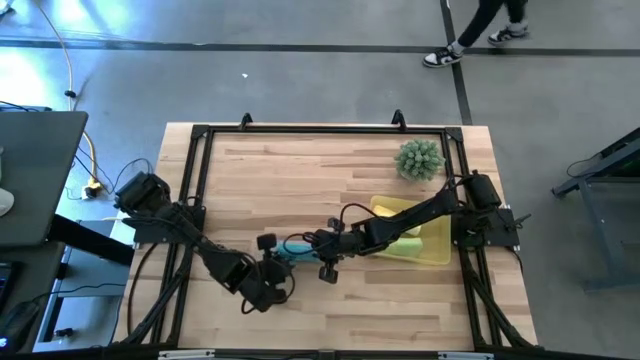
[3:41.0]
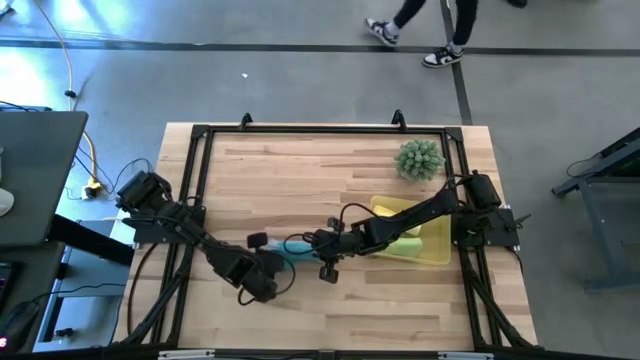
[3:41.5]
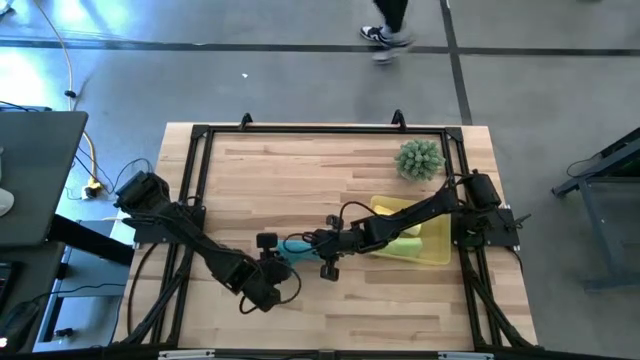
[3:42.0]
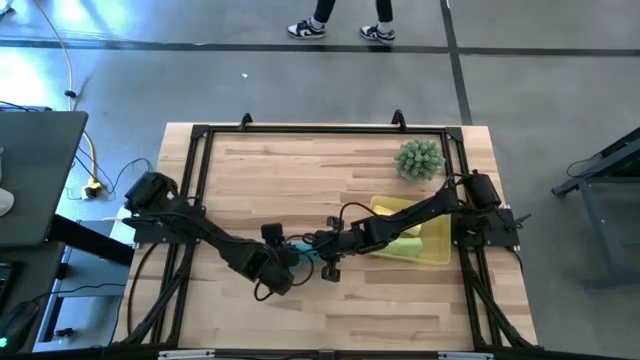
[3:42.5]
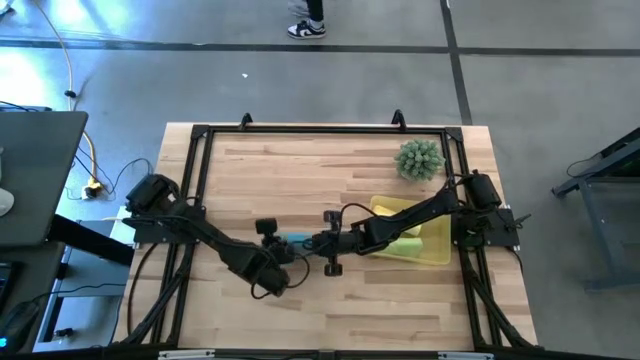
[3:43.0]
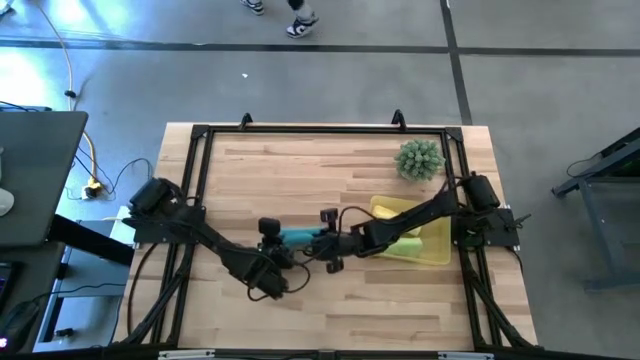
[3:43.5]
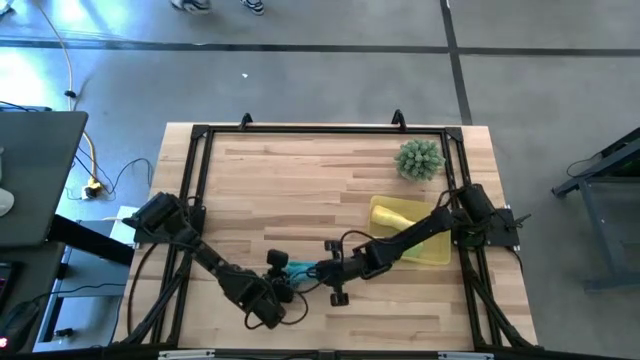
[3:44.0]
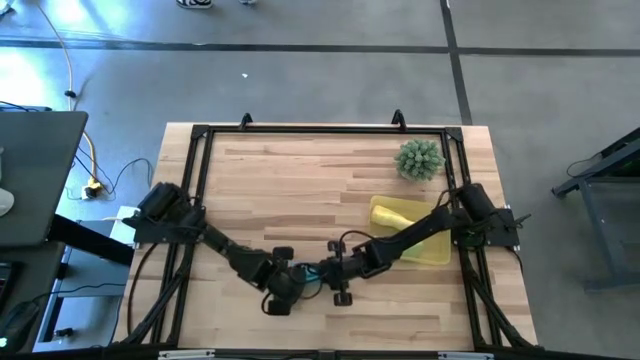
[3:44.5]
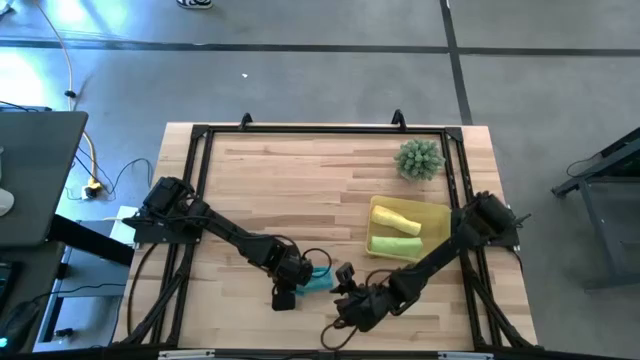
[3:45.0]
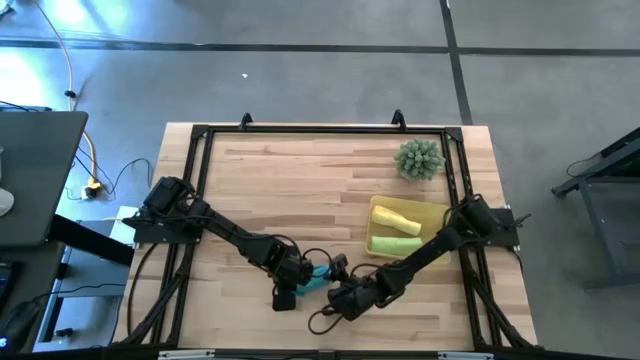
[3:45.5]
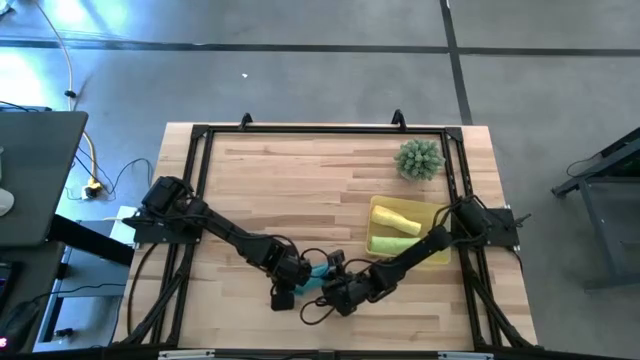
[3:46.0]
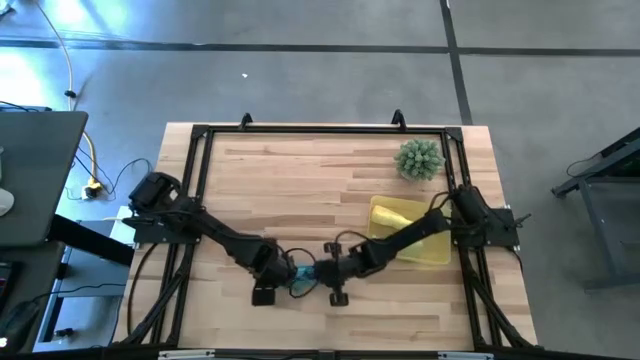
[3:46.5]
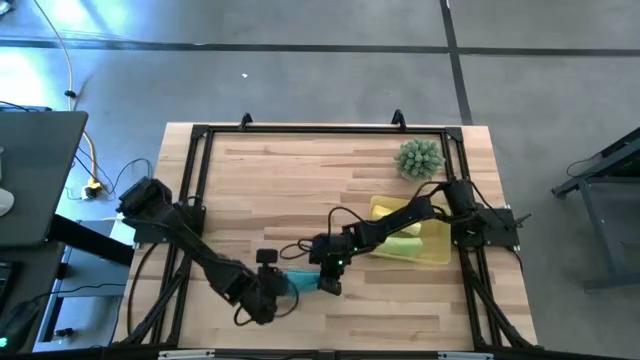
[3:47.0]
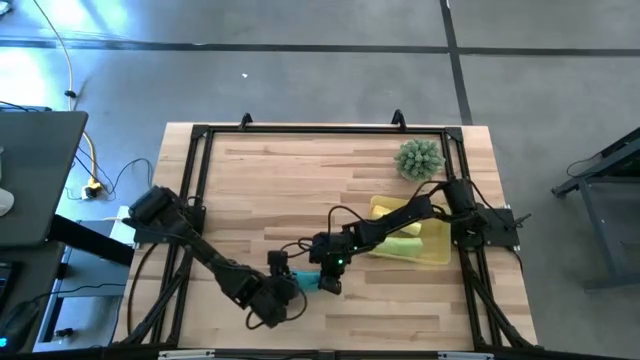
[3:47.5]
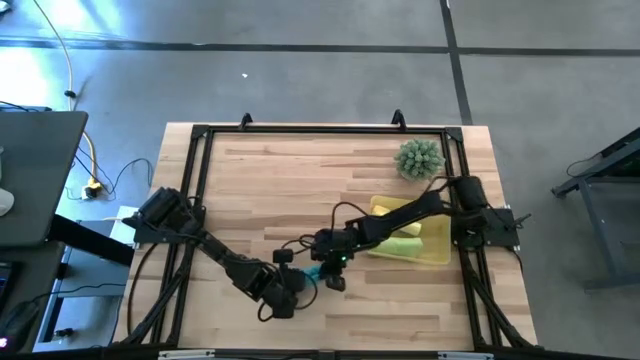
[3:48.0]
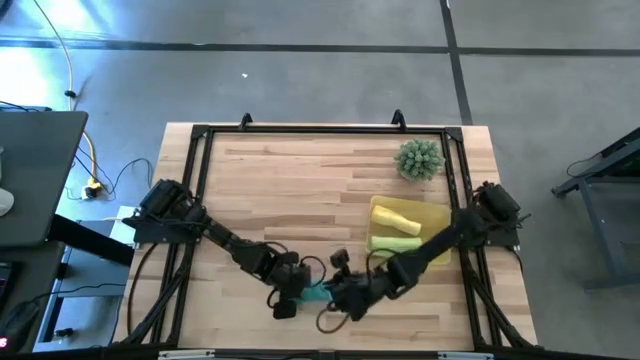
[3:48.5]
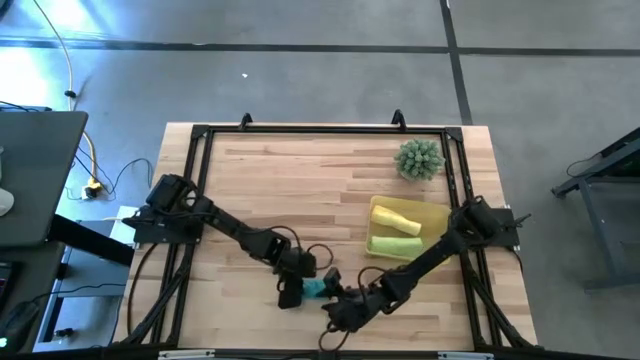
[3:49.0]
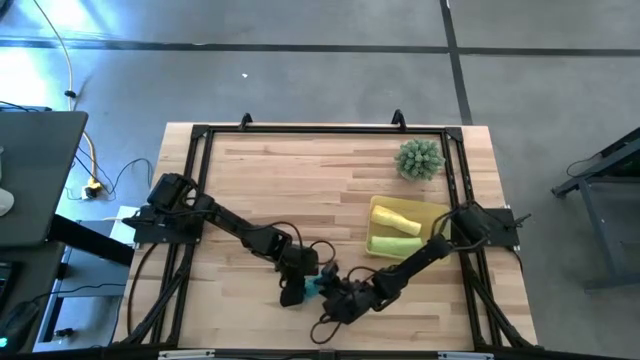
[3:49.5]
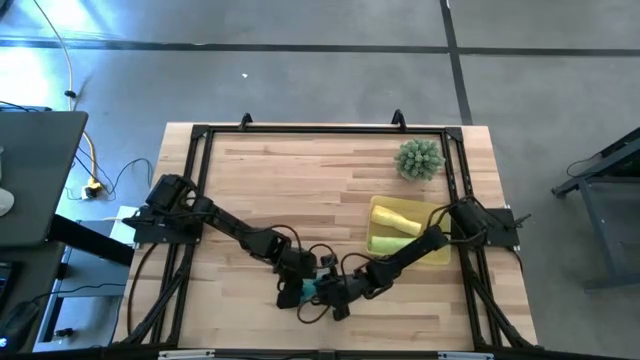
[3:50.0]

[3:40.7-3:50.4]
Task: Roll microfiber towels into tight, uniform cylinder then place into a basket
Roll the blue microfiber towel

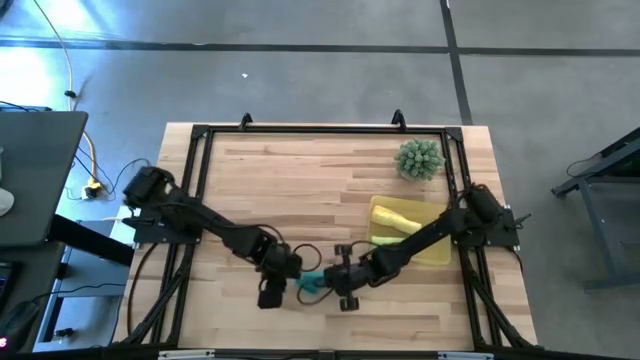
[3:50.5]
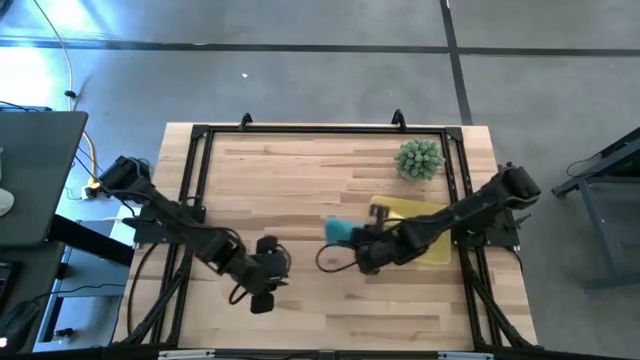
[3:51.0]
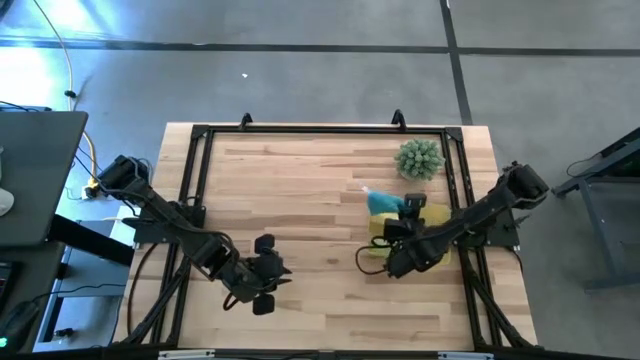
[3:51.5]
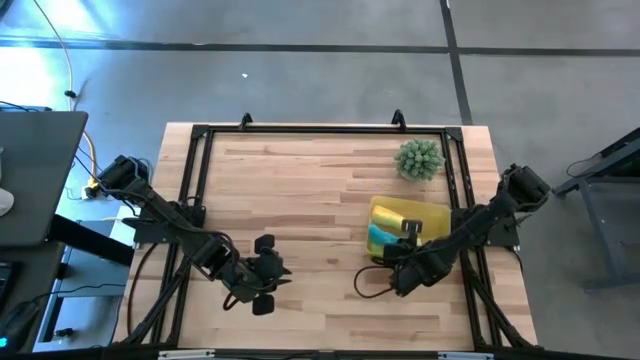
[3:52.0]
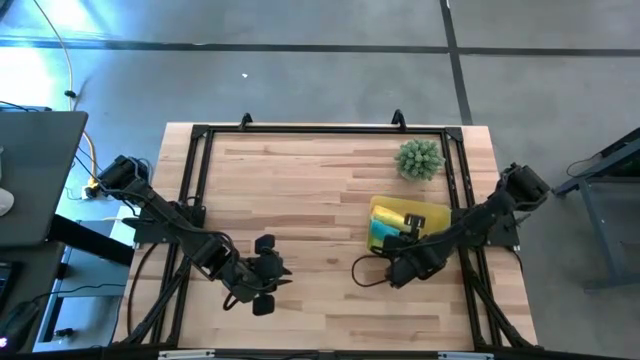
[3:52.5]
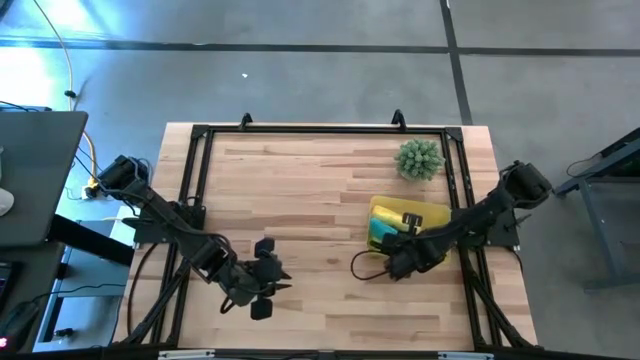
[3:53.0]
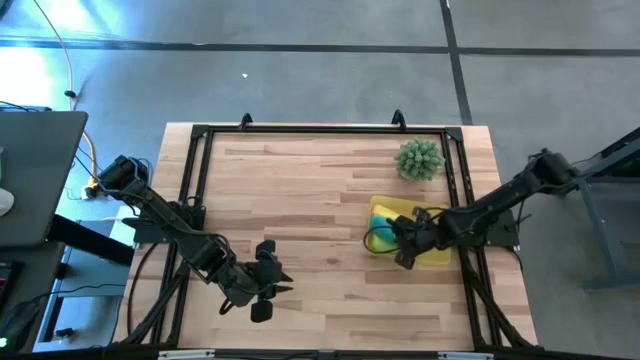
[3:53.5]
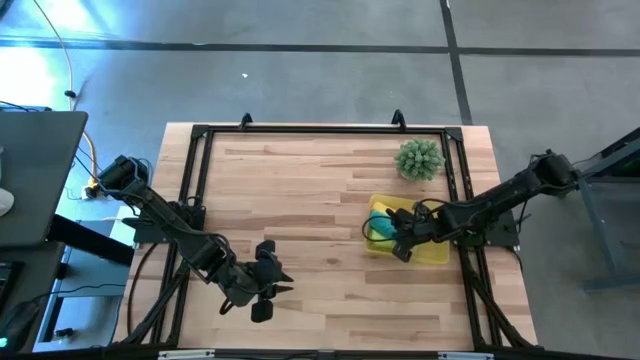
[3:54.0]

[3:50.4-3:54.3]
Put the blue microfiber towel into the yellow bin

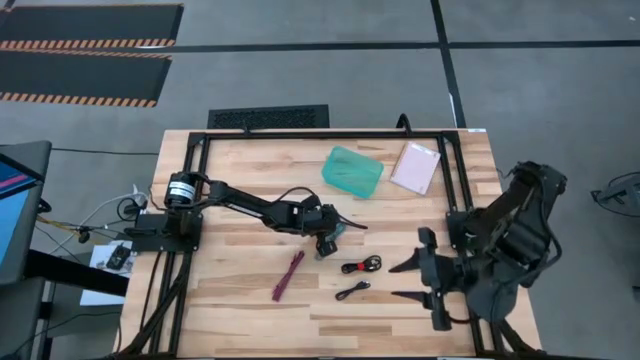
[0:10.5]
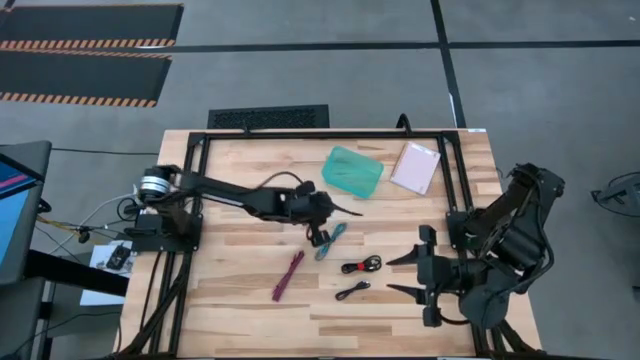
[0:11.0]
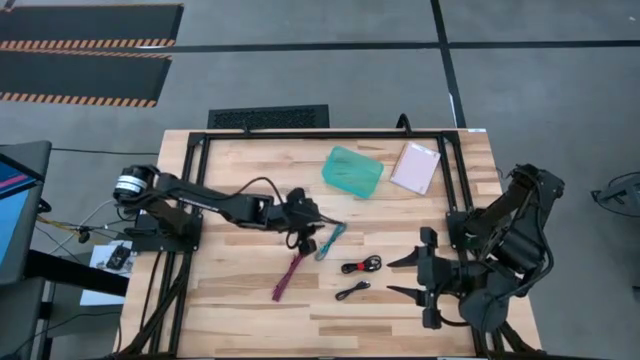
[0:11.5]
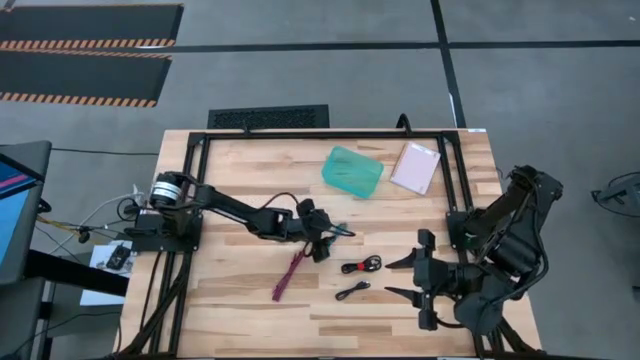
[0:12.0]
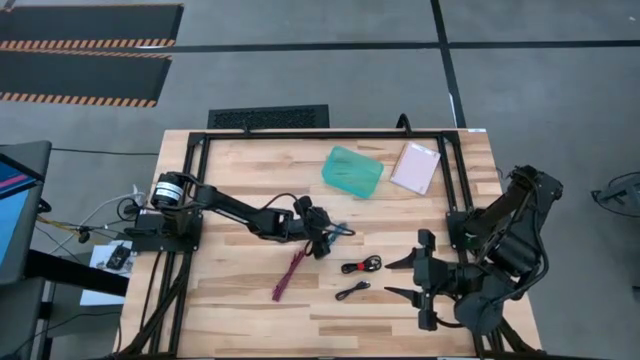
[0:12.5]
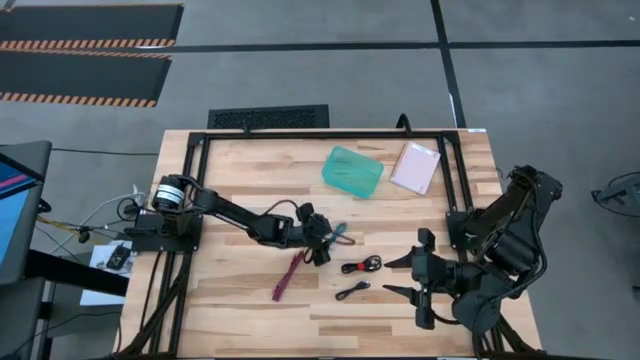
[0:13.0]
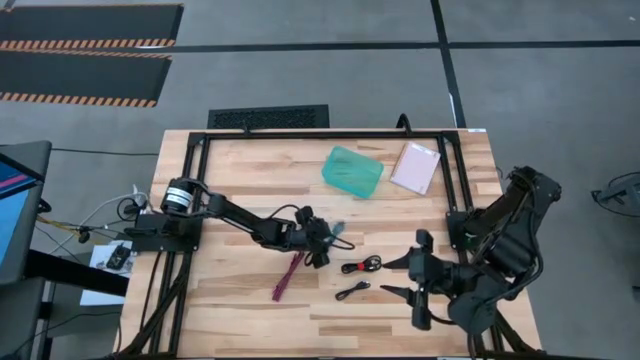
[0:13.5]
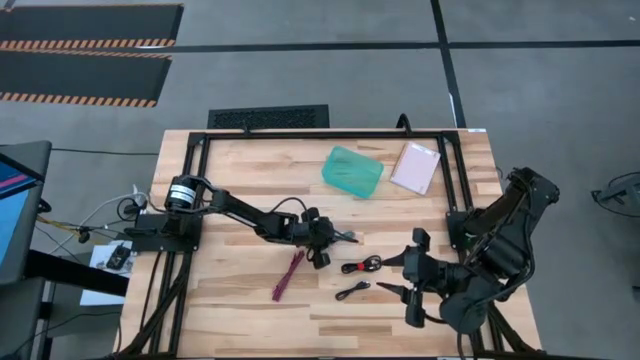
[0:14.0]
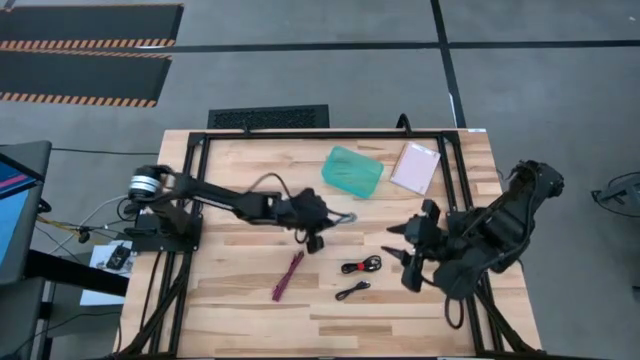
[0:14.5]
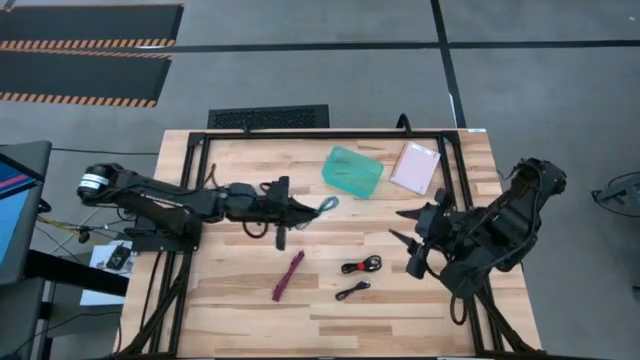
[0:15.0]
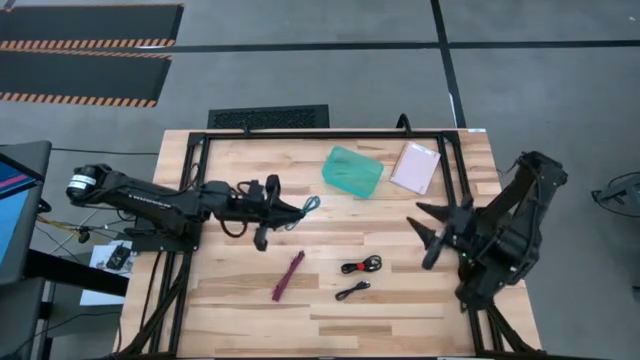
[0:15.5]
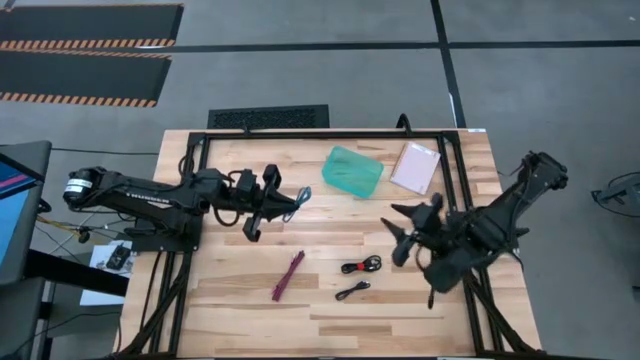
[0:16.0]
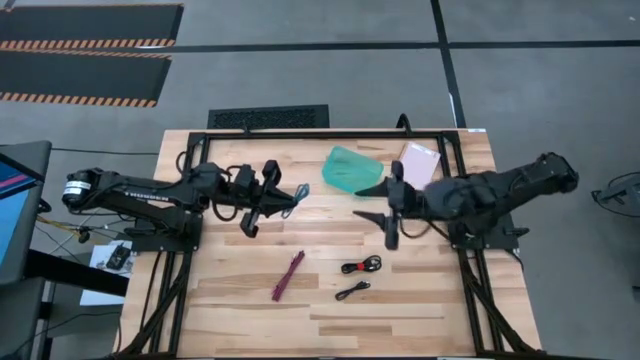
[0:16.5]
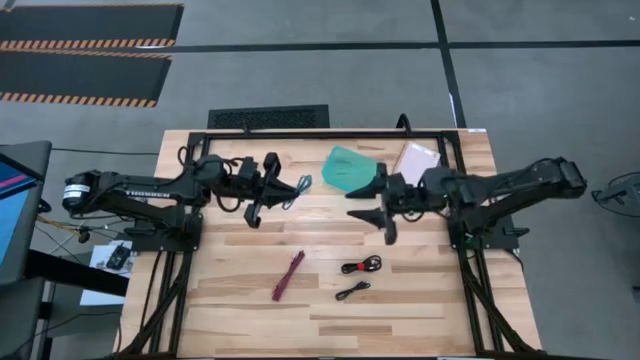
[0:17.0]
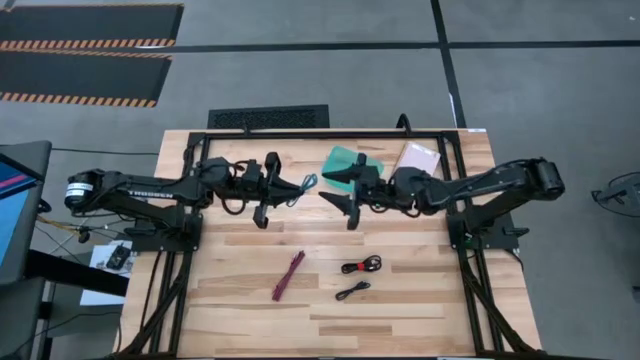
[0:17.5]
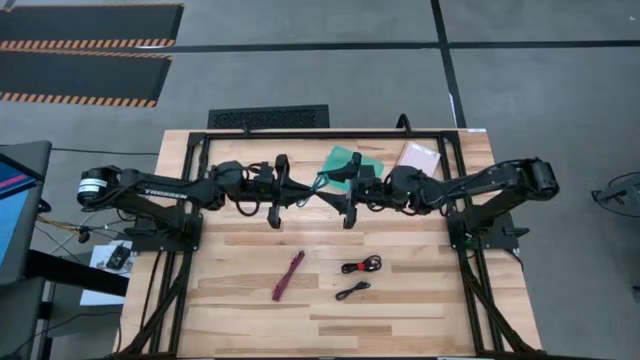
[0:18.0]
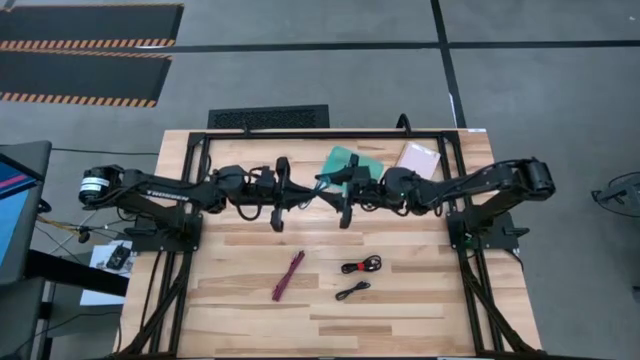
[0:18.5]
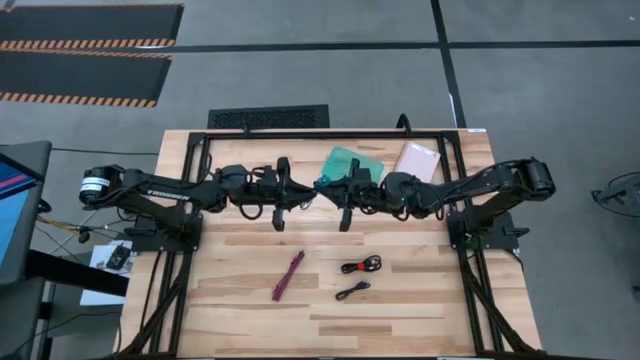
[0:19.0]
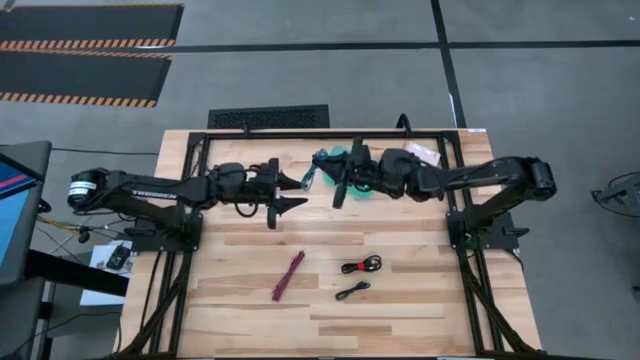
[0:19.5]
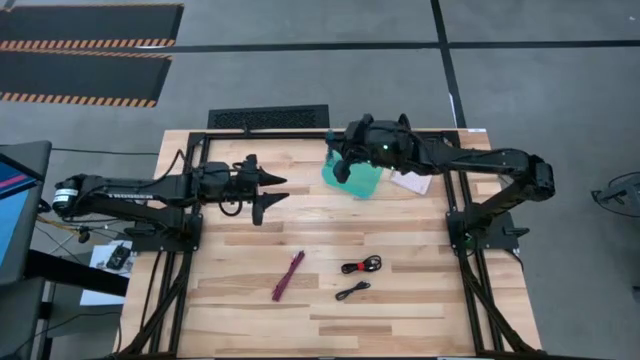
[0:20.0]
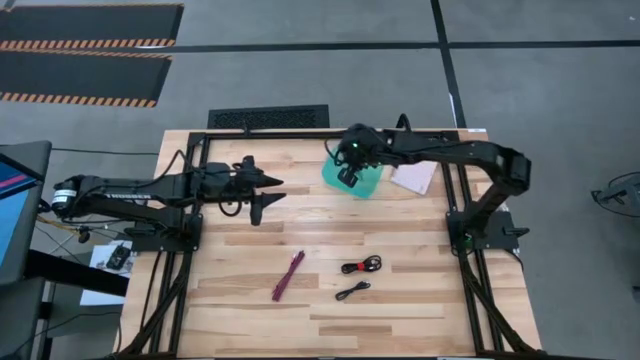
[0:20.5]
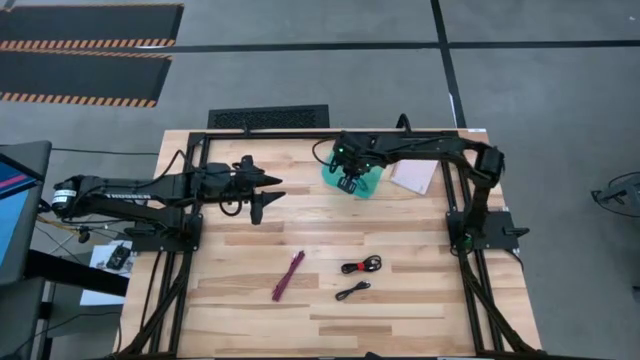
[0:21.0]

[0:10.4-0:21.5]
Task: Pick and place USB-C Cables
Put the blue charger cable into the light blue bin
